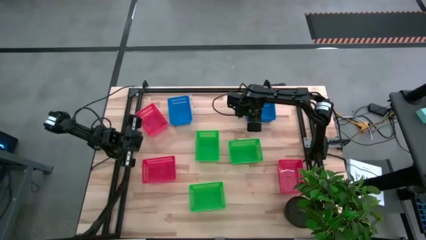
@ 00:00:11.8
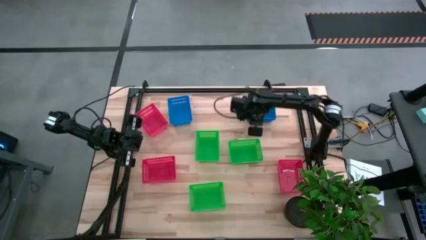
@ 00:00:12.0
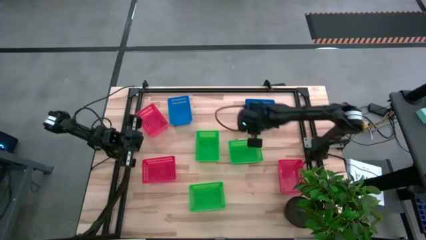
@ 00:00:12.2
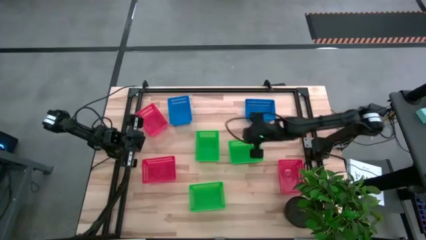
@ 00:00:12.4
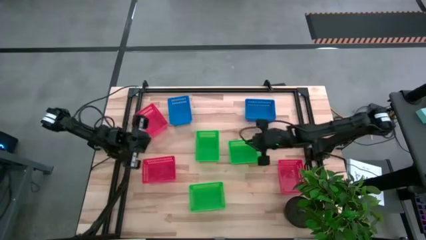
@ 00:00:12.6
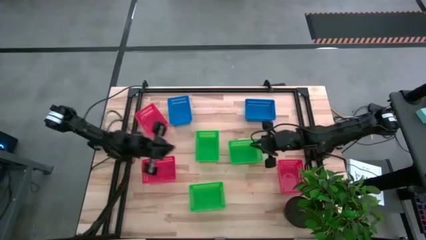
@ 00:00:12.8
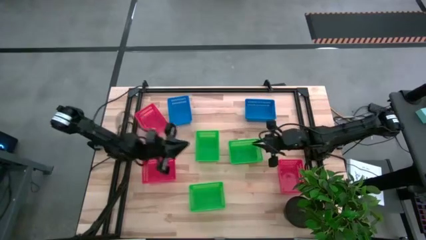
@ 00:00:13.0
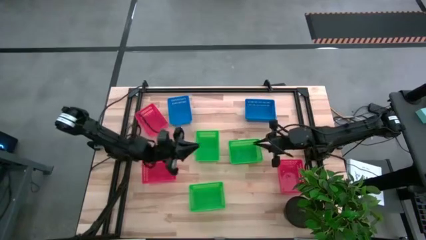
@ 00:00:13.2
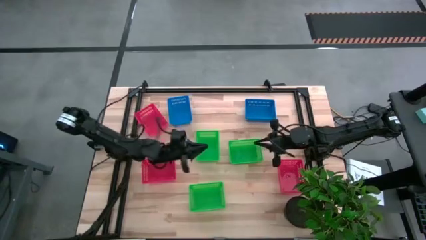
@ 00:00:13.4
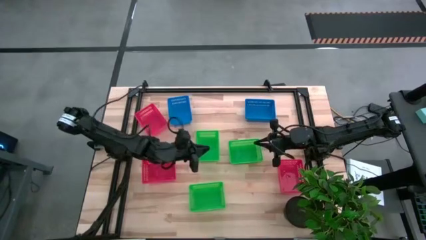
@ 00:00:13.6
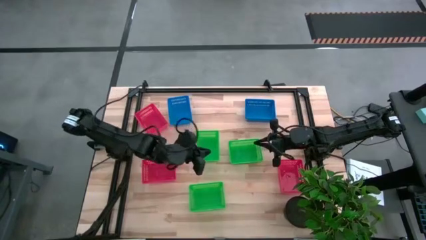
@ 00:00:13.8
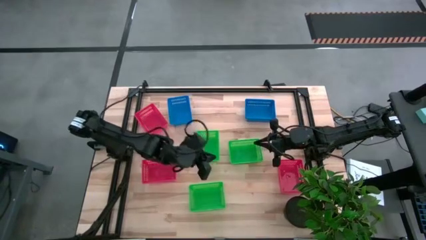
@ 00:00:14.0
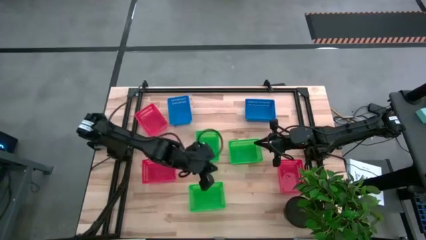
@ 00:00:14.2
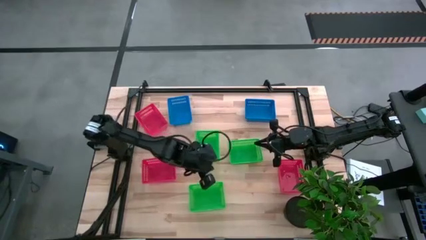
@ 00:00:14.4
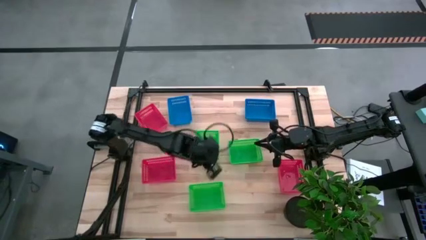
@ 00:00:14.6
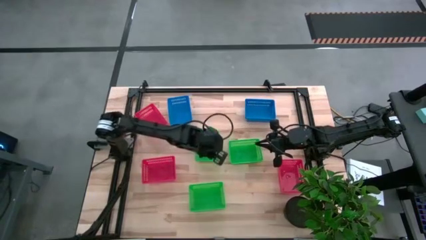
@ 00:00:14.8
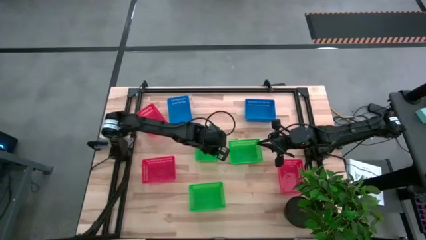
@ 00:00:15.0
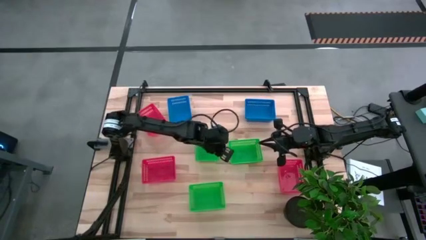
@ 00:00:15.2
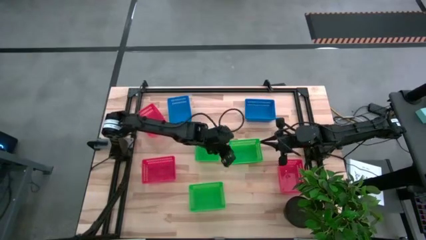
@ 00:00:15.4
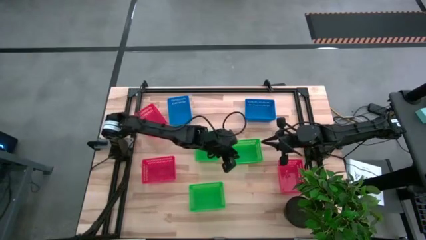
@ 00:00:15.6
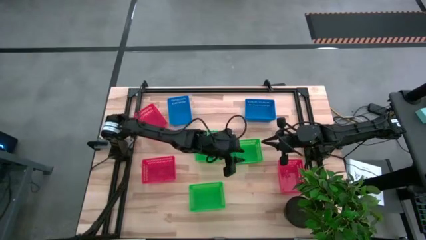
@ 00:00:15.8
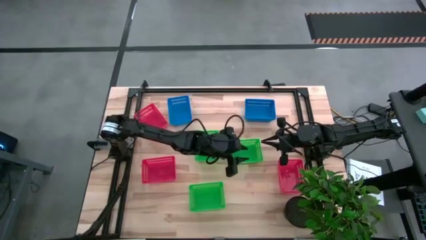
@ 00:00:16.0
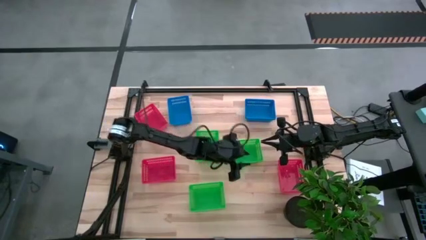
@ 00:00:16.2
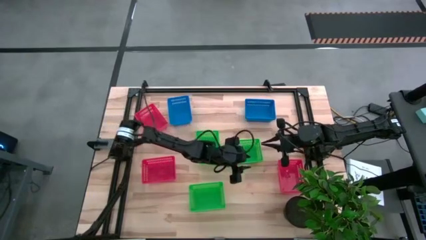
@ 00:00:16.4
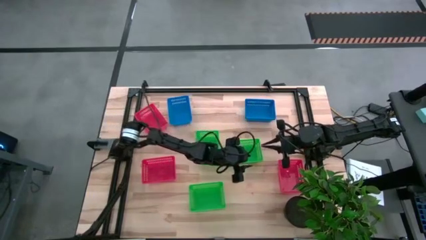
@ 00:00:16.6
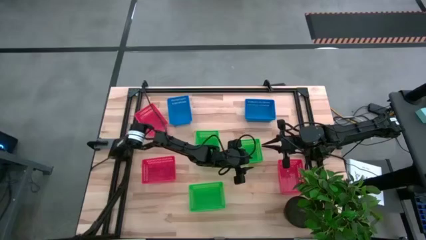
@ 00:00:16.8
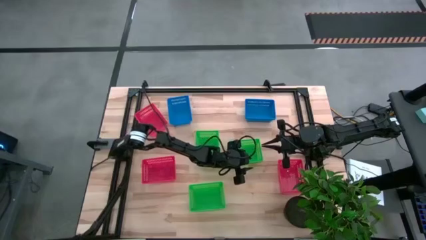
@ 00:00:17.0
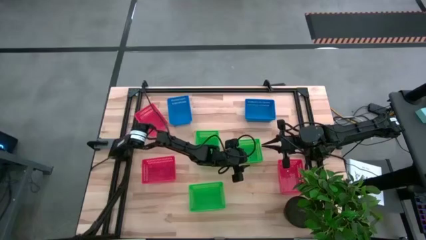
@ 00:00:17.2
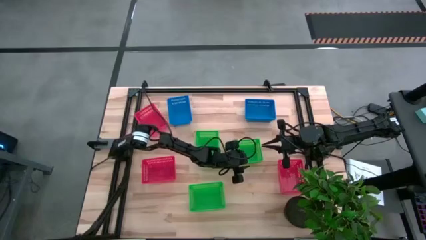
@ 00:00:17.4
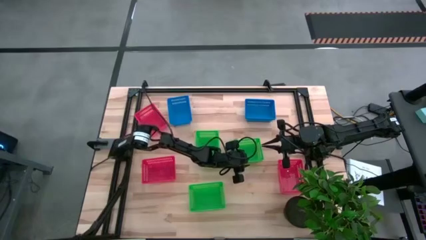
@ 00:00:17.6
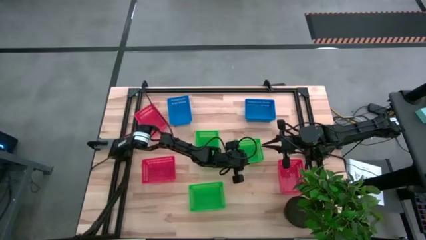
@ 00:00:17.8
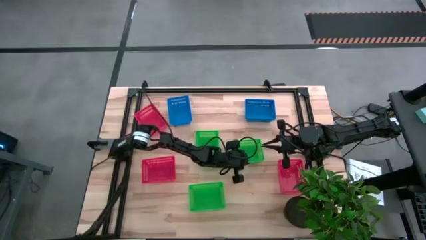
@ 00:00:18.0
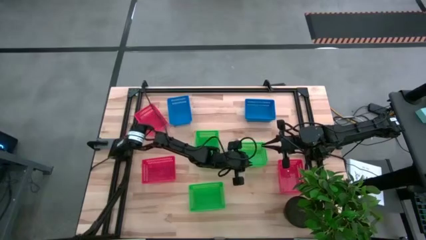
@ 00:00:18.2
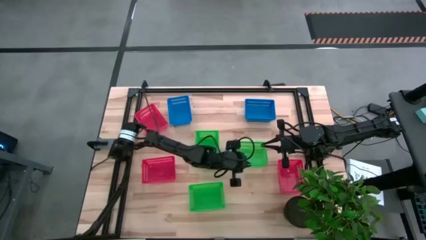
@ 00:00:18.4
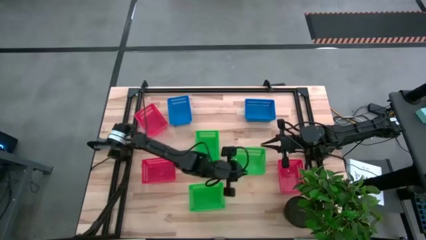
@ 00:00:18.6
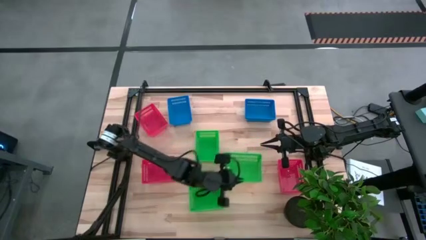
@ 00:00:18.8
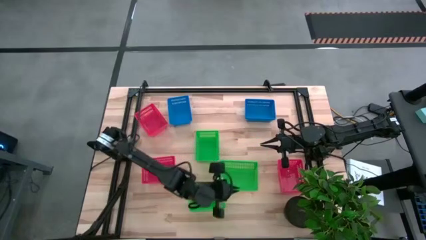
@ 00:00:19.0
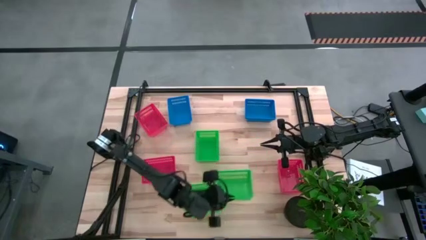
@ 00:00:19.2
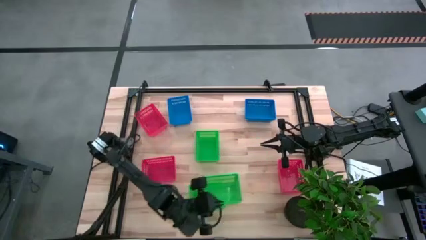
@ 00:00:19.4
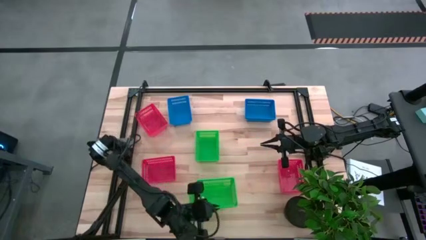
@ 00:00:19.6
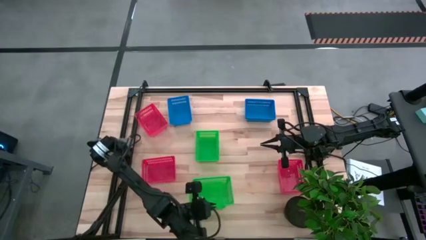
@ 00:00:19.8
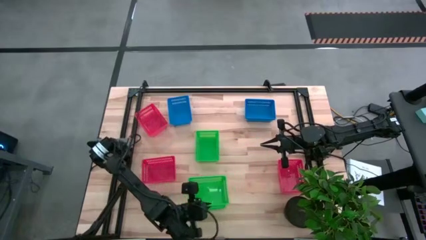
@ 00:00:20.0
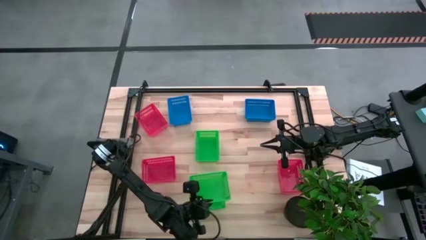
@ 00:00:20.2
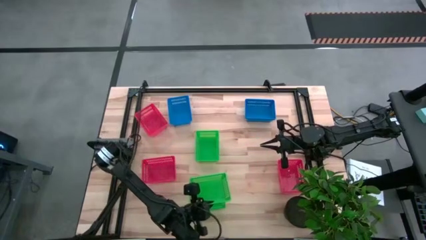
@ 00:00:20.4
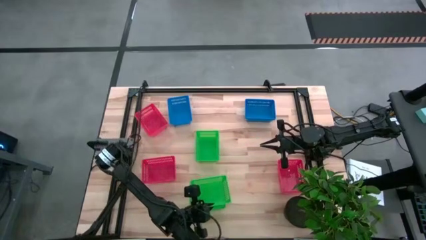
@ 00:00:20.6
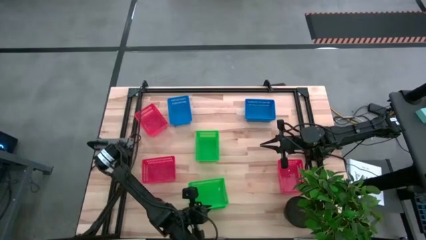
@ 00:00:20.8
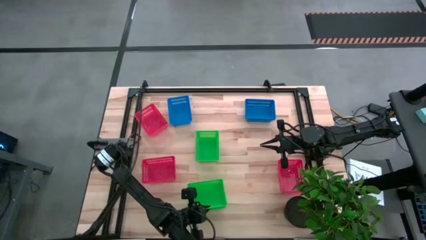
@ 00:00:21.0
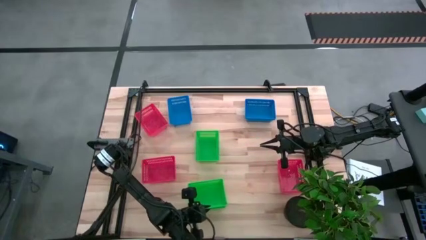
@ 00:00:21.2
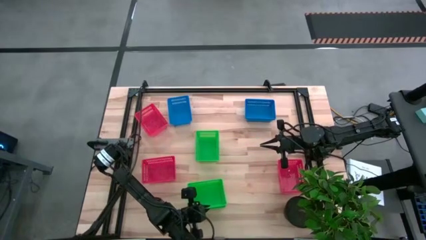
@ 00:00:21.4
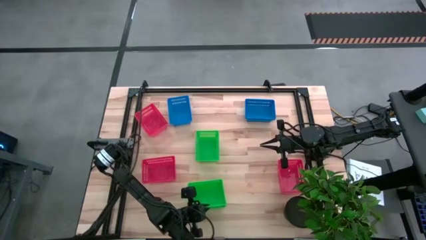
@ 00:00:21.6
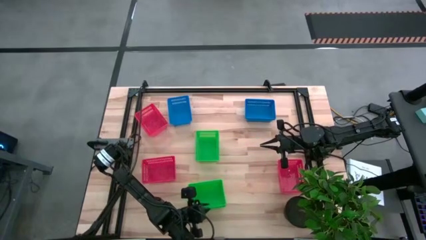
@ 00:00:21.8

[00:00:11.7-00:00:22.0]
Stack the top right green bin on top of the bottom green bin

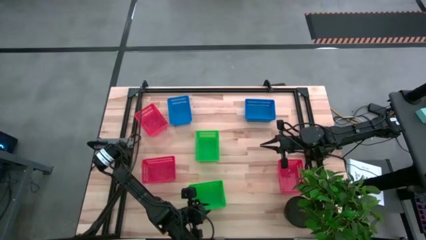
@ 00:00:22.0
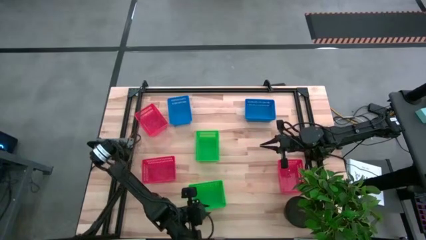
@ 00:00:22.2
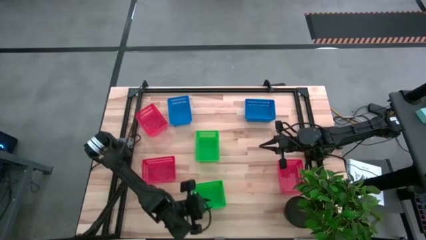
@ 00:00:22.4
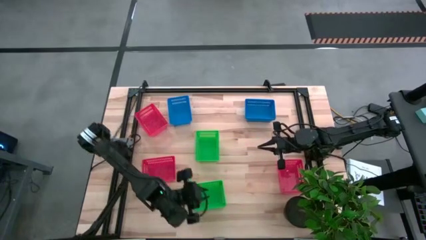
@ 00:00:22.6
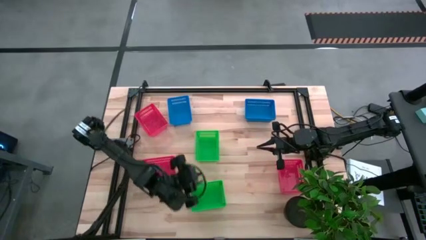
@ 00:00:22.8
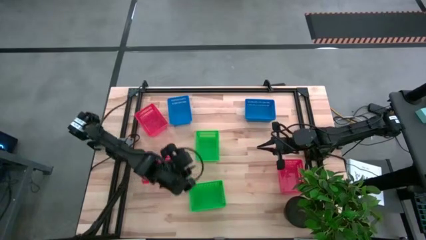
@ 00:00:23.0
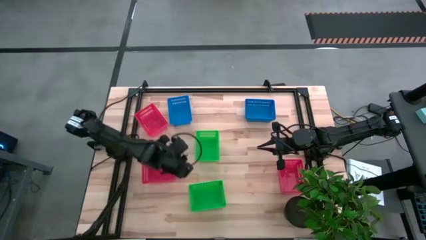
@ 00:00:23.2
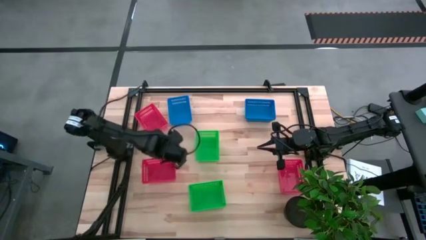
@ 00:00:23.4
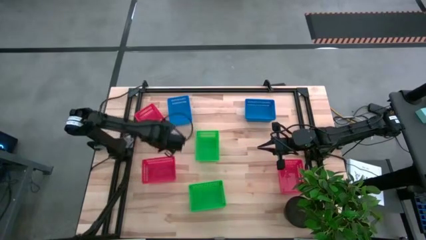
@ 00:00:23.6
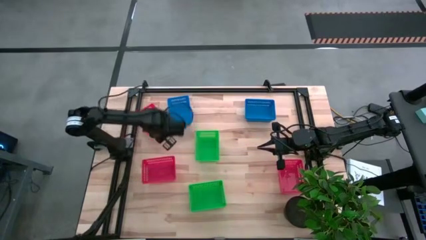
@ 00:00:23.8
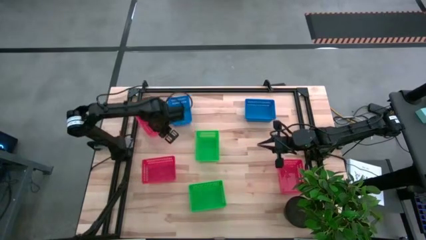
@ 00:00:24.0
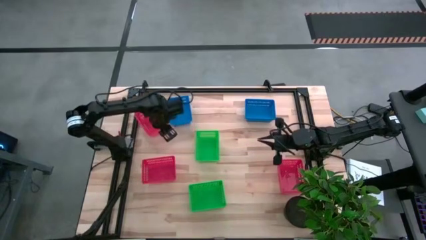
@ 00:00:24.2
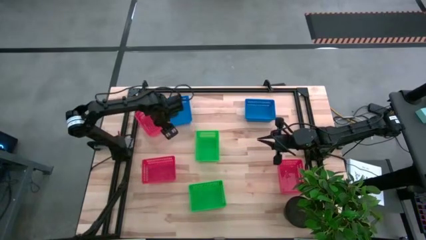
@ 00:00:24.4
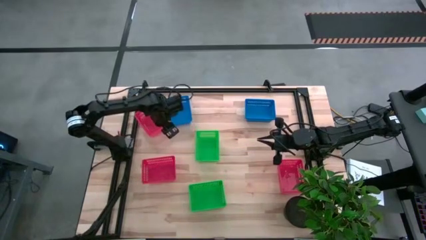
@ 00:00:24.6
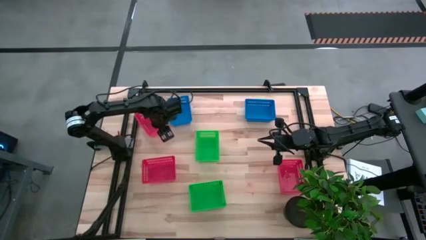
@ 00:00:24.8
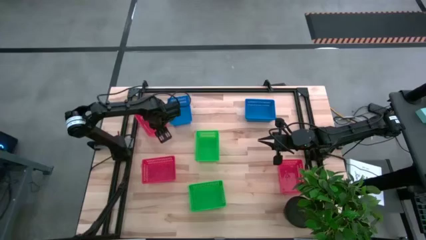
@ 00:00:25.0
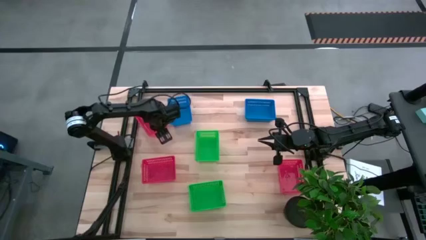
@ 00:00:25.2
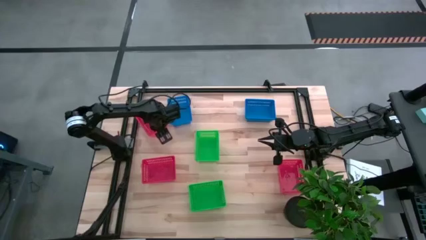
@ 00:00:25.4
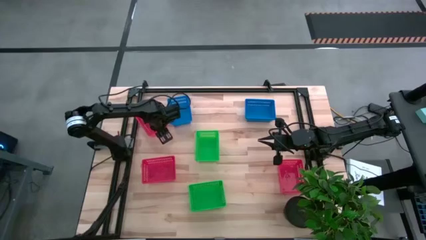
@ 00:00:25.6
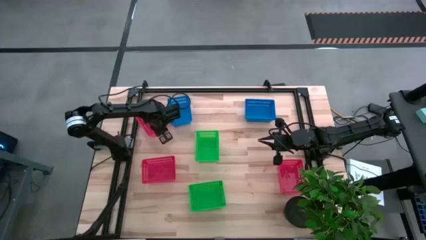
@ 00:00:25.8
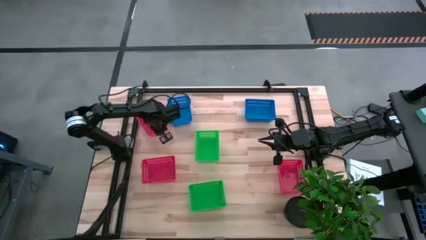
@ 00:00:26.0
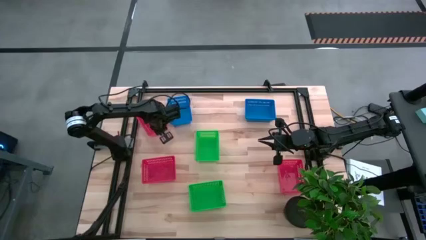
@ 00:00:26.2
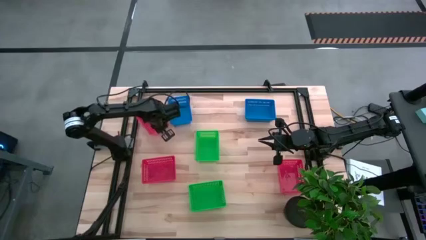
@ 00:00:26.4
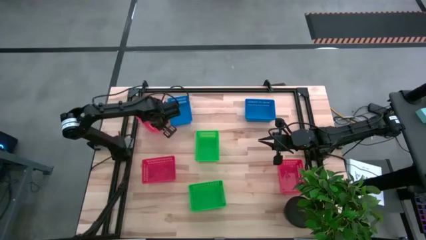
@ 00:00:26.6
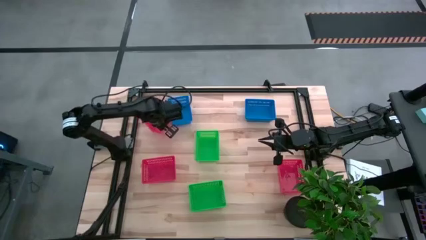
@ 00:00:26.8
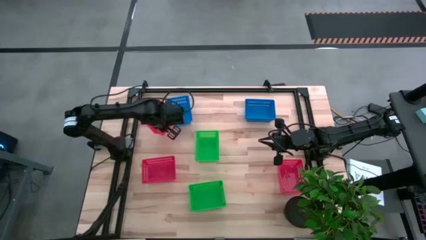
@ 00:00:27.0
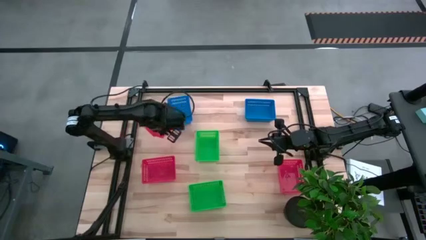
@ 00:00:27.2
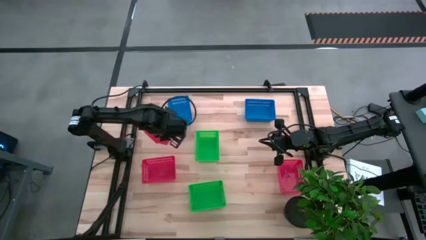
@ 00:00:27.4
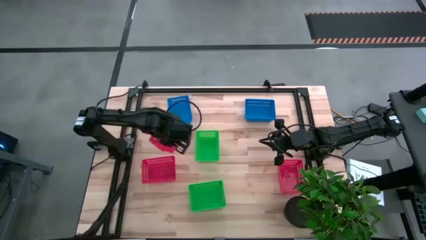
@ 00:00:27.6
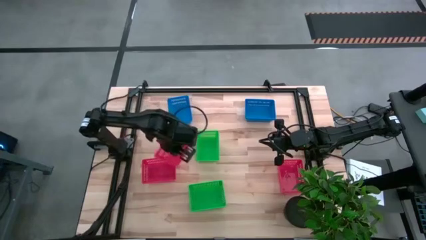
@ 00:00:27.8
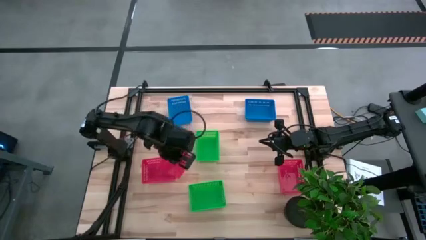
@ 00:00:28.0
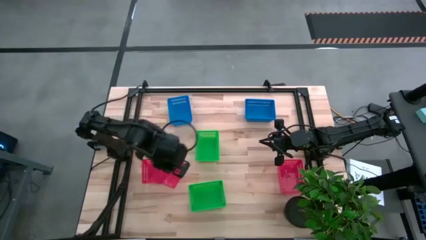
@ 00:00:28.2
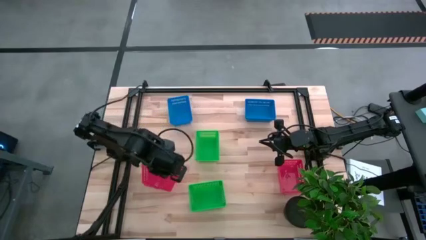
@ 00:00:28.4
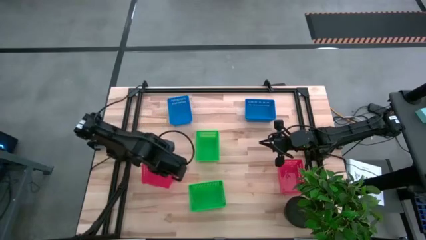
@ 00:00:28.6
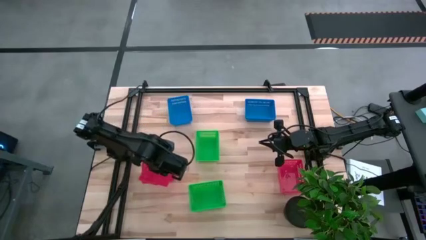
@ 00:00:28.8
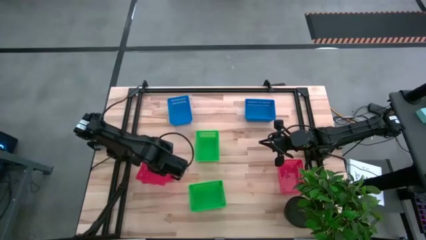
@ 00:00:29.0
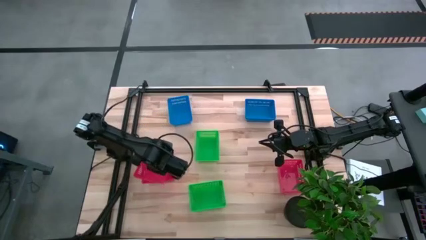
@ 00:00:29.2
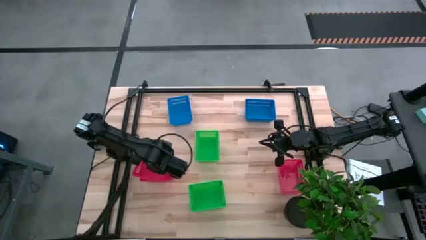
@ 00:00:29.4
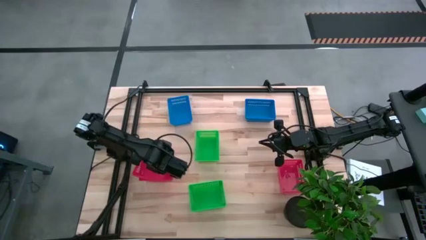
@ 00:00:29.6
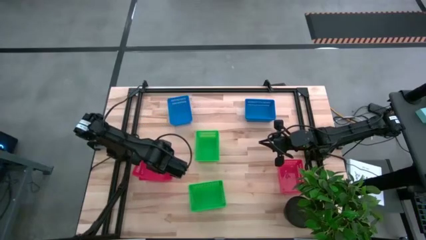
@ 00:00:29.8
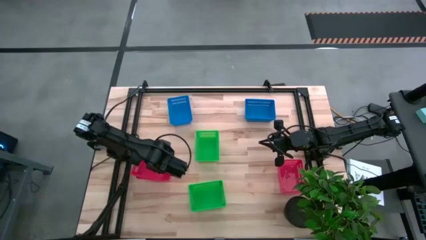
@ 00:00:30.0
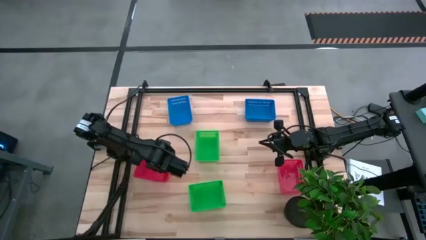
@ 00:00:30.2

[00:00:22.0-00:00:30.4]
Stack the top red bin on top of the bottom left red bin
